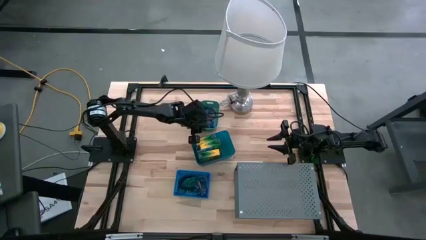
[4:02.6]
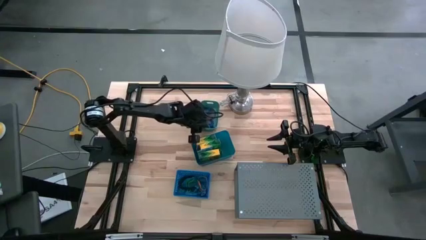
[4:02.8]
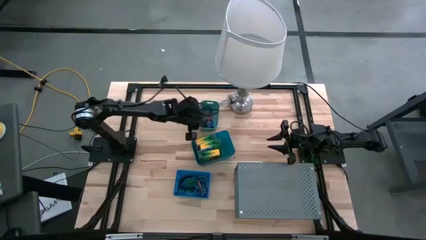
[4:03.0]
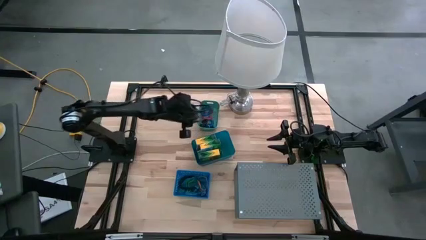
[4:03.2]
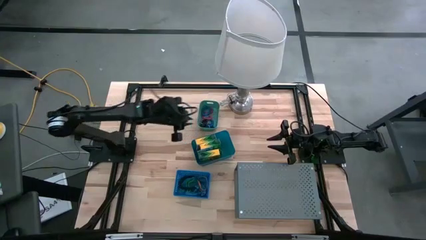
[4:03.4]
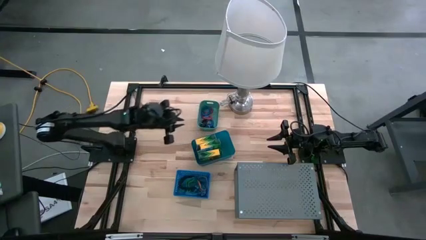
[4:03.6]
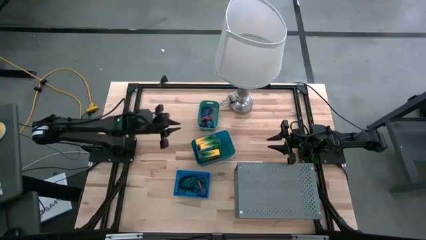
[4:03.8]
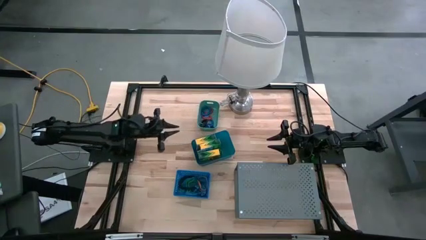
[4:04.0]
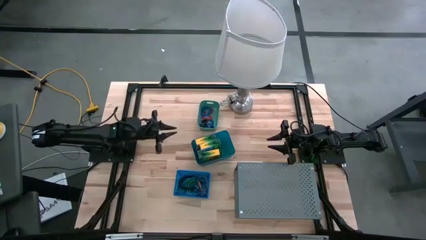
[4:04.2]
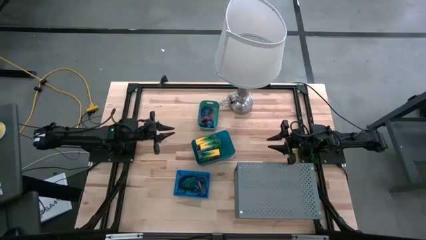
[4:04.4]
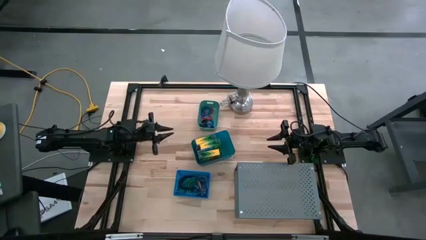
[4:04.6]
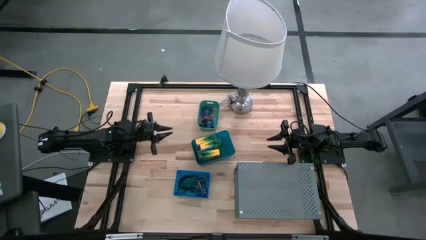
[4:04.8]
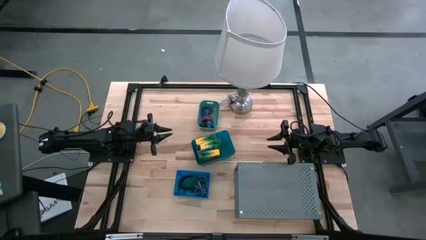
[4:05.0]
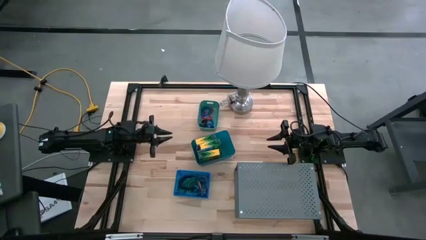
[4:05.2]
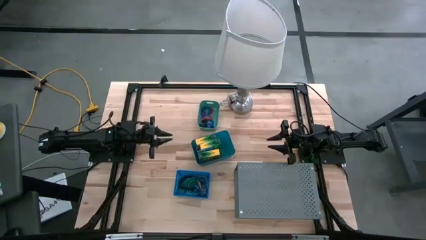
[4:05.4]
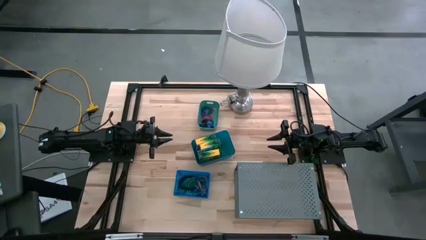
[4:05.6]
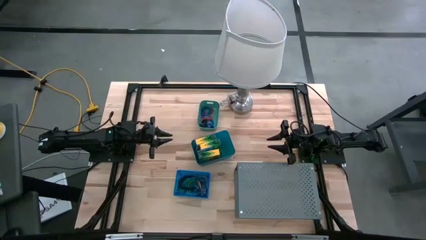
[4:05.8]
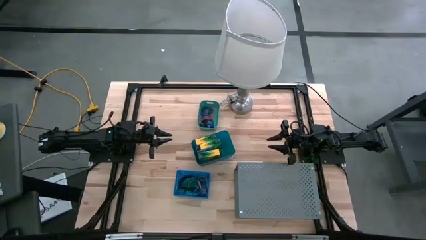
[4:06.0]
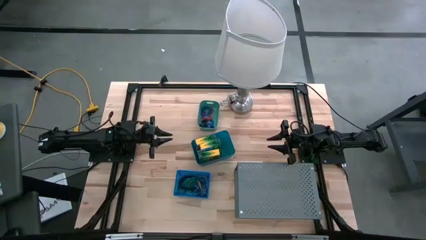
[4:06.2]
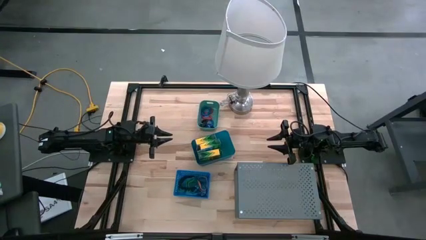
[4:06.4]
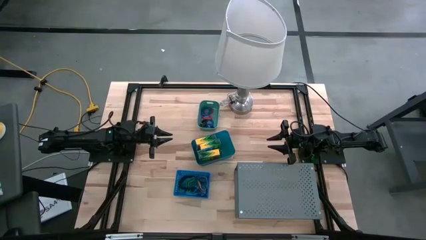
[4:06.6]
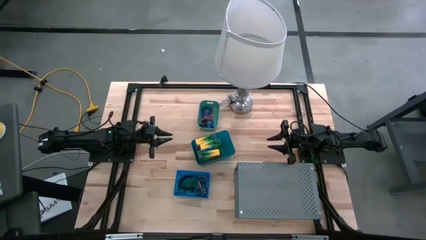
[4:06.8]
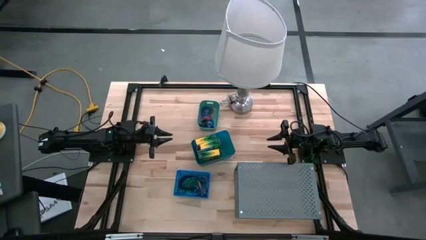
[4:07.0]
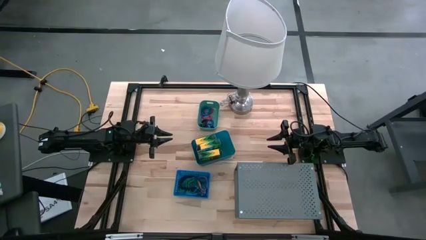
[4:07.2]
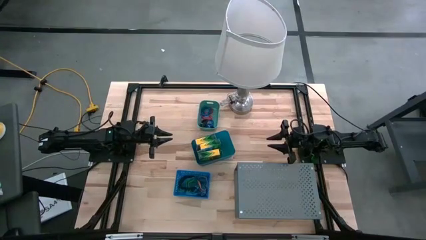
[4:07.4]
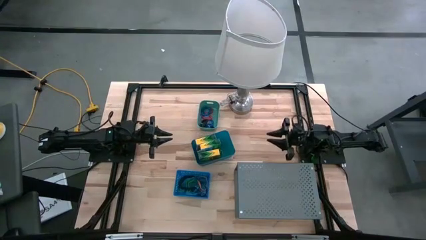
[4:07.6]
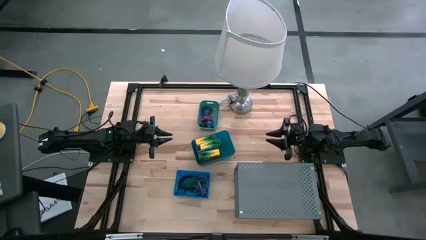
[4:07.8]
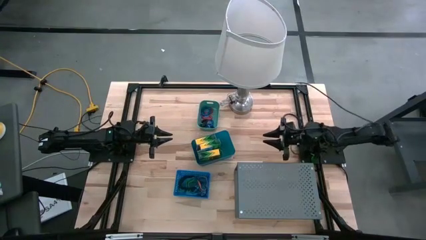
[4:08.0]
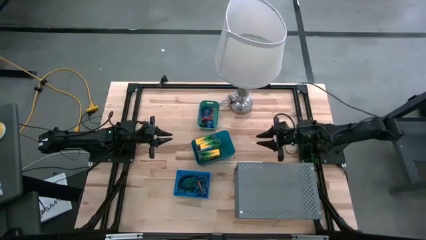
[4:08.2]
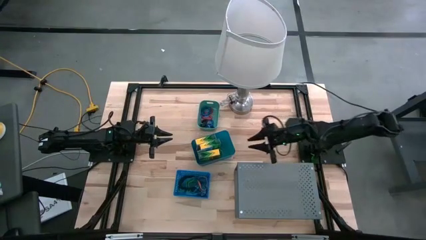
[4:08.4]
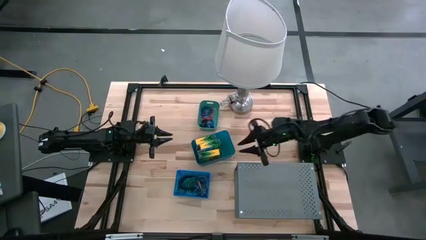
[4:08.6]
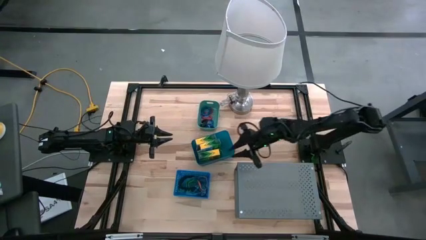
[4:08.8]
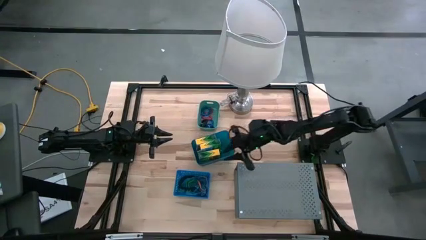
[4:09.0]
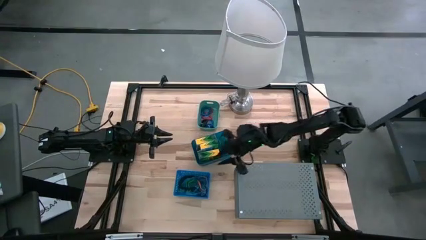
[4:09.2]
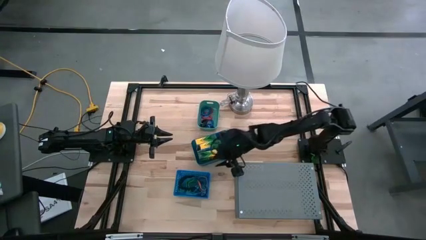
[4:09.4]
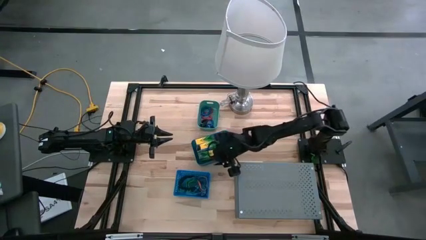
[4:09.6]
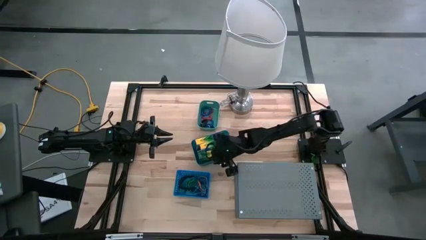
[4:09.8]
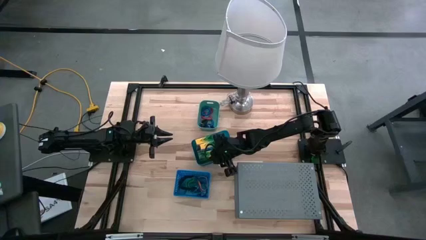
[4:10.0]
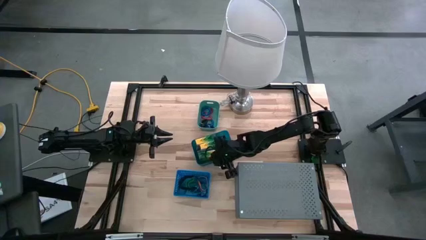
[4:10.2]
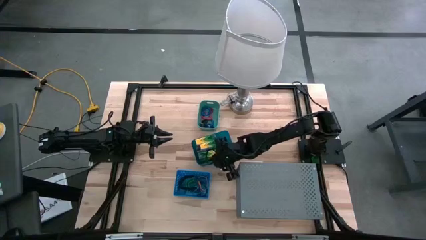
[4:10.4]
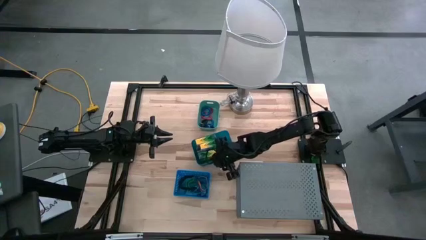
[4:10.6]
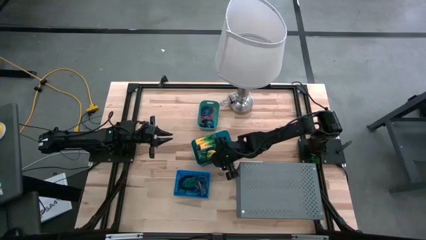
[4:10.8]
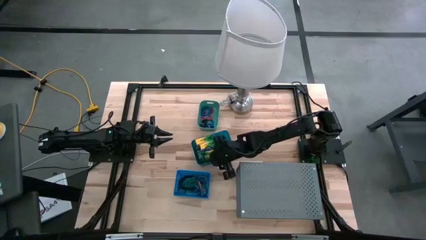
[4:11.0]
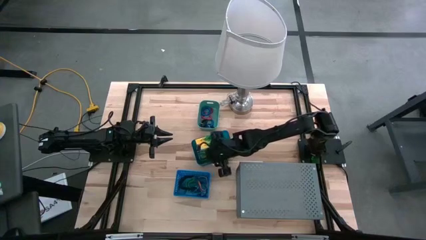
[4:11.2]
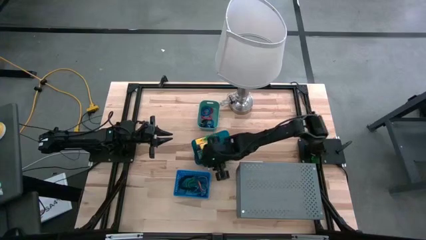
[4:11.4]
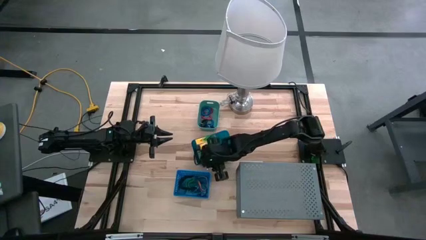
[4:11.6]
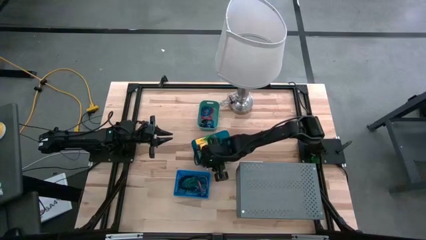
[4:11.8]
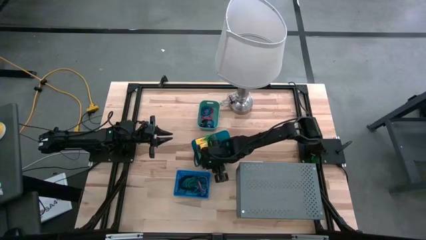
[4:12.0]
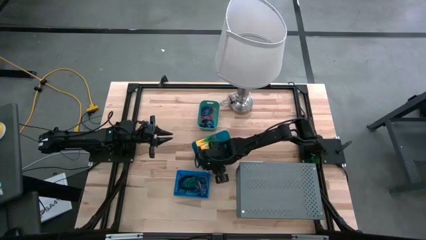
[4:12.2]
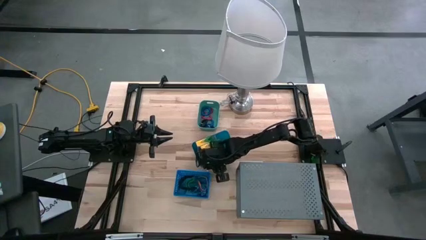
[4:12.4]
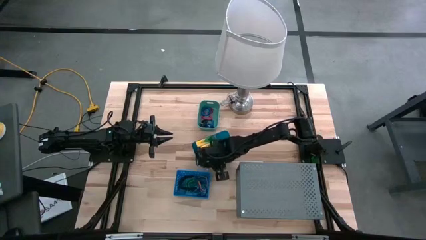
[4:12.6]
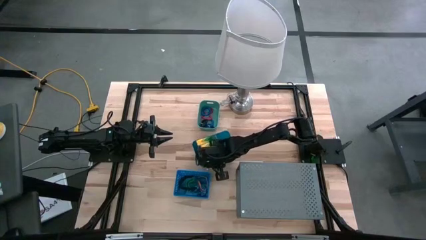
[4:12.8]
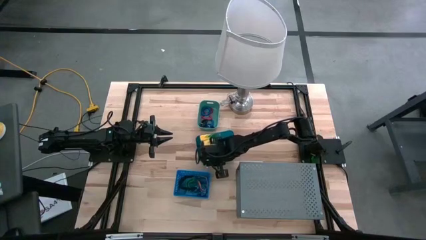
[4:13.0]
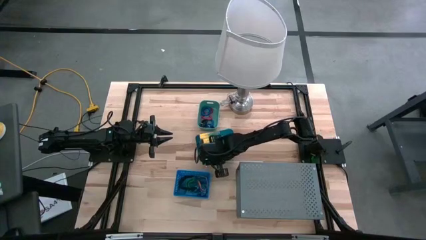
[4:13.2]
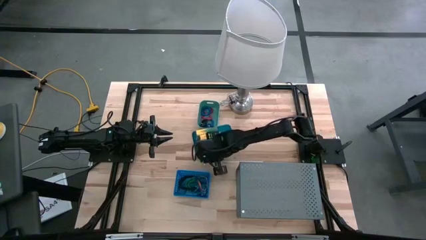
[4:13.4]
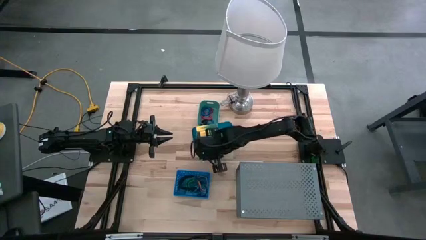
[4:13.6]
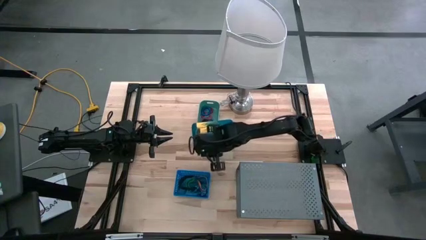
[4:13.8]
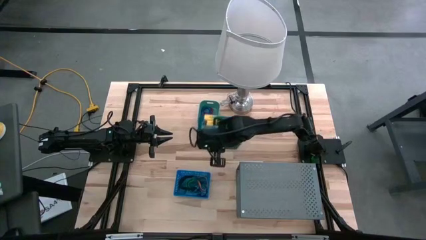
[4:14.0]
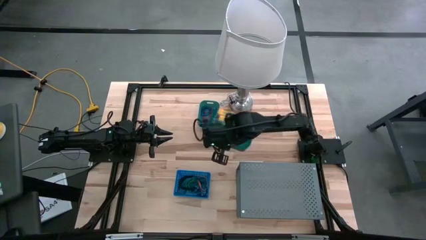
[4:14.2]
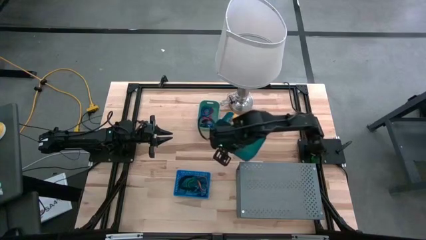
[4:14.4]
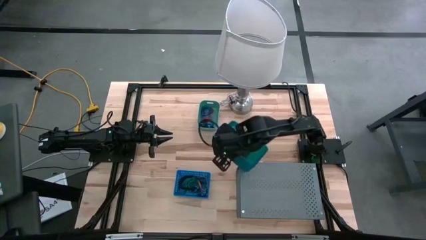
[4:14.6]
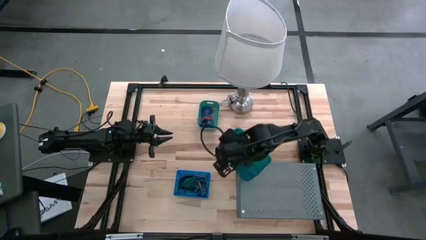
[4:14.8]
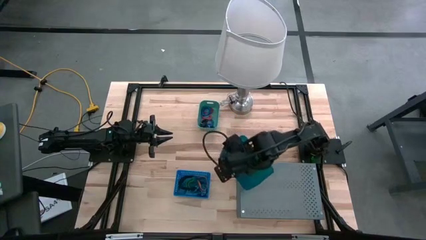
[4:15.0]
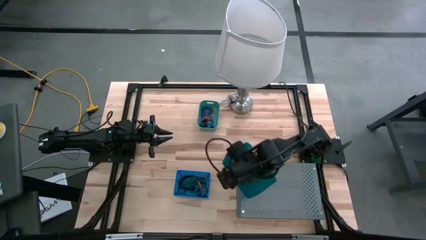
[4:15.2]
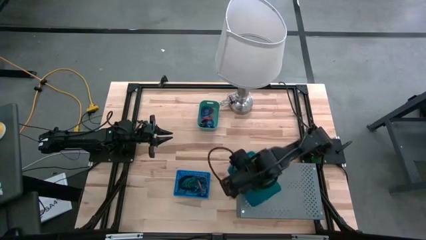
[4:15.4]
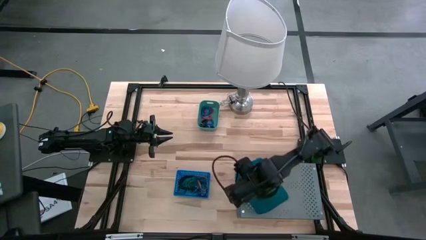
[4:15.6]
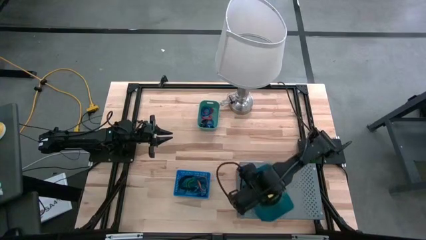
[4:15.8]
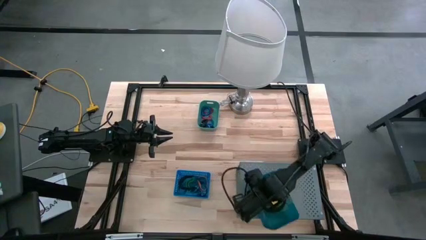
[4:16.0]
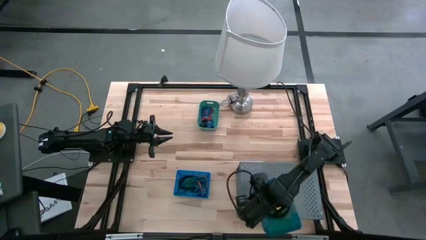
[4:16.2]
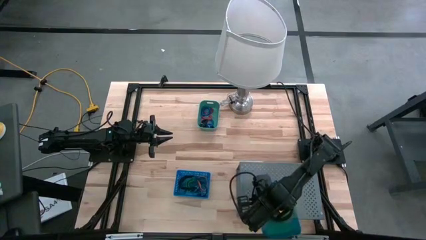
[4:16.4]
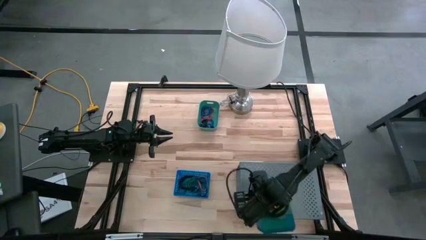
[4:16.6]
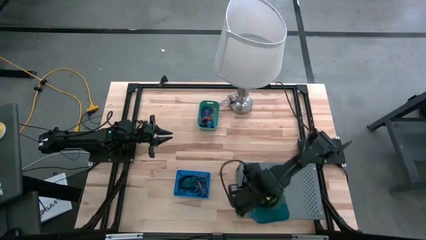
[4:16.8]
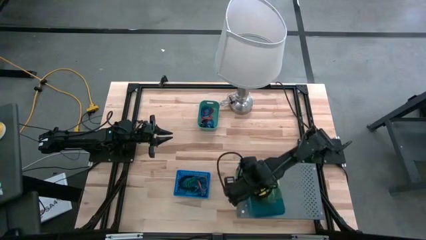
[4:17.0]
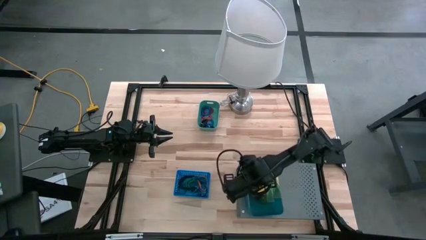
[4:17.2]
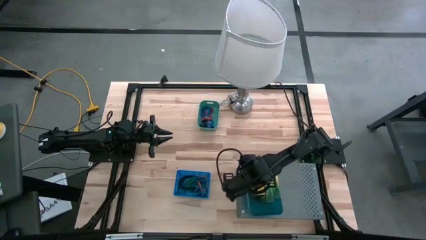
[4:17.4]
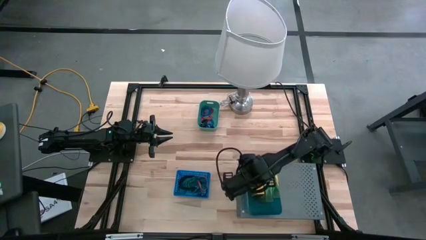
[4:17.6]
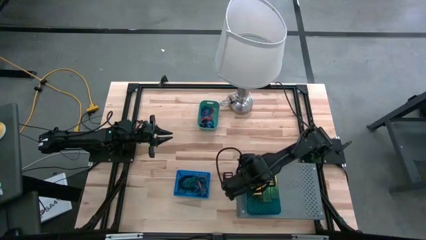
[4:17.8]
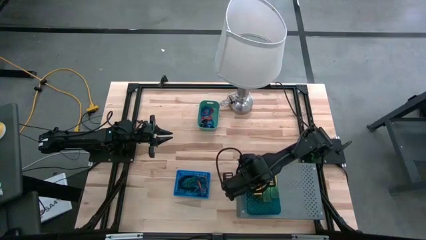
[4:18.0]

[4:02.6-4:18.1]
Task: Pick & Place Office Desk Supplies
Put the top blue bin on the shelf

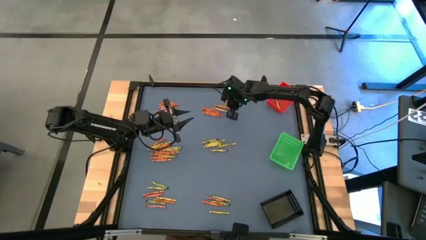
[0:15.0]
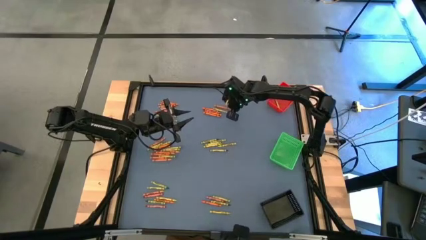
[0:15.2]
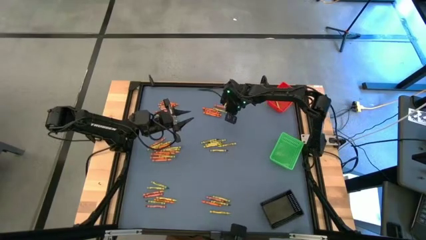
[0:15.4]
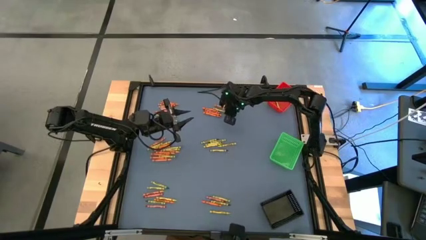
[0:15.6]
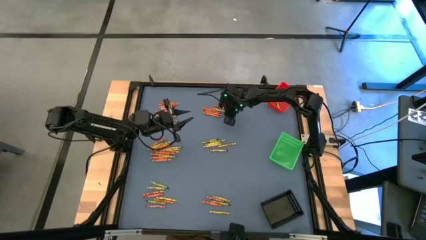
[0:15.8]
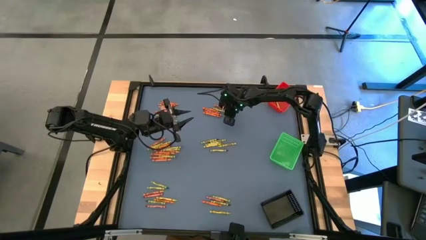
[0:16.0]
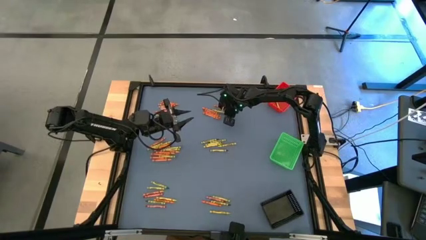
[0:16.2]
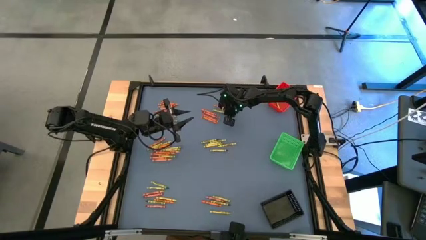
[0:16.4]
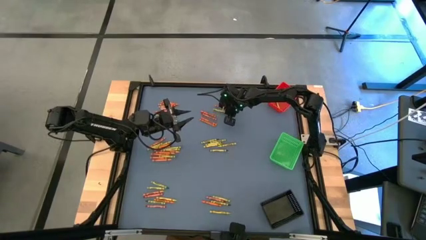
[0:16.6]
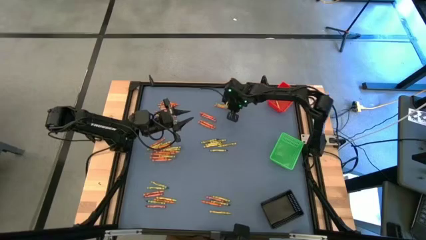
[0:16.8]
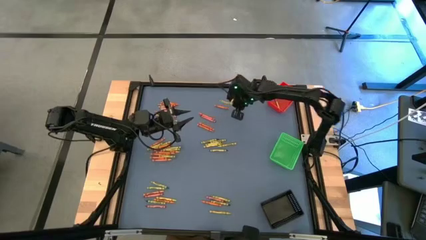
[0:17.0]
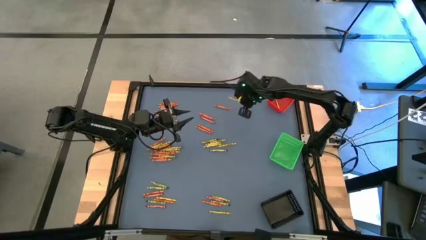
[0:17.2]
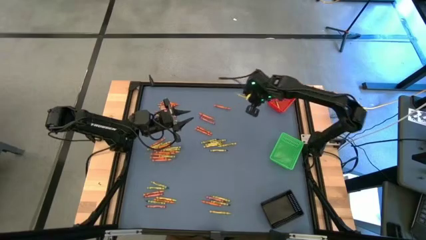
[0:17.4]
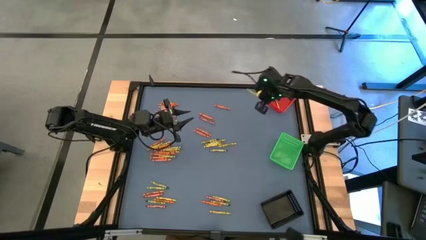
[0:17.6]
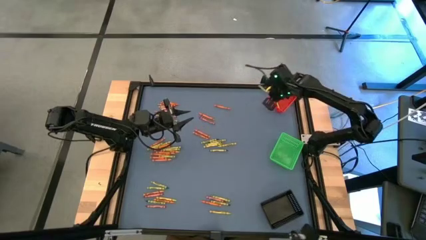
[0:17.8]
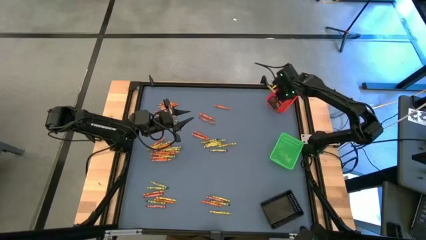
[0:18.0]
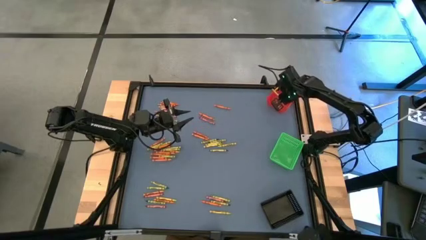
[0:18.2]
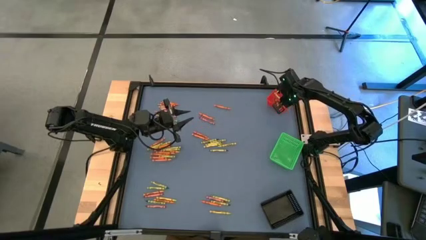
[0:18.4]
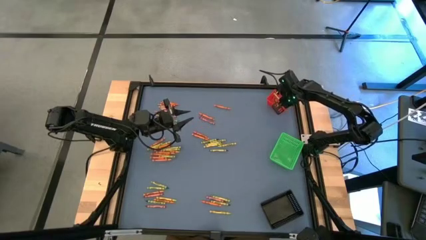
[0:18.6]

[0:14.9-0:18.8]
Task: Sort crayons
Put the green crayon into the red bin
